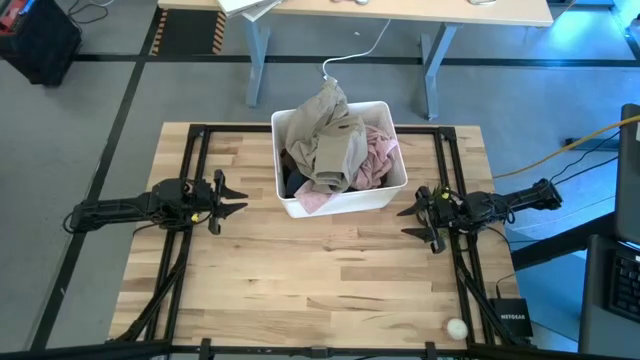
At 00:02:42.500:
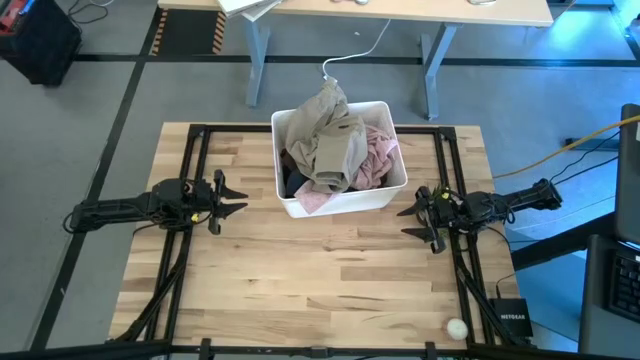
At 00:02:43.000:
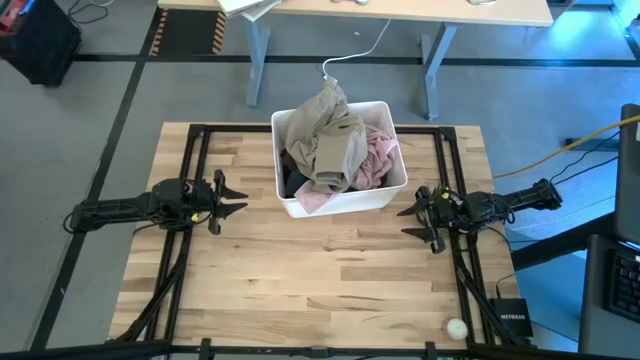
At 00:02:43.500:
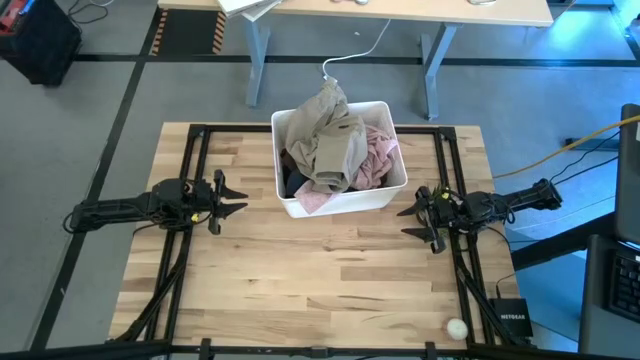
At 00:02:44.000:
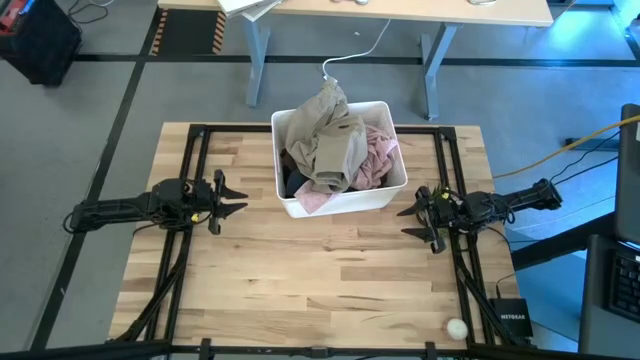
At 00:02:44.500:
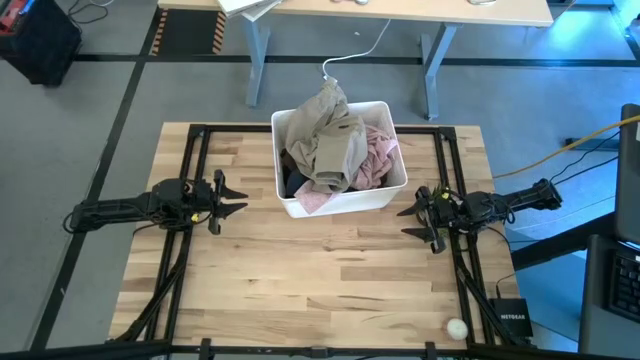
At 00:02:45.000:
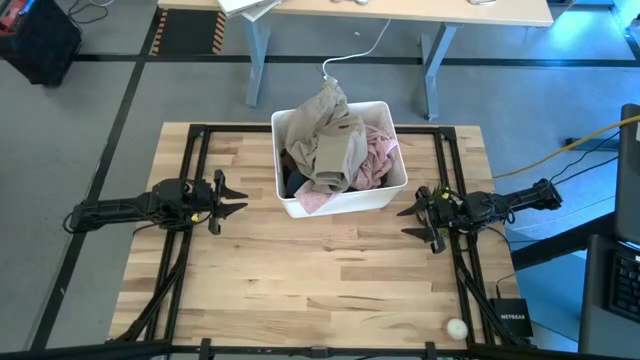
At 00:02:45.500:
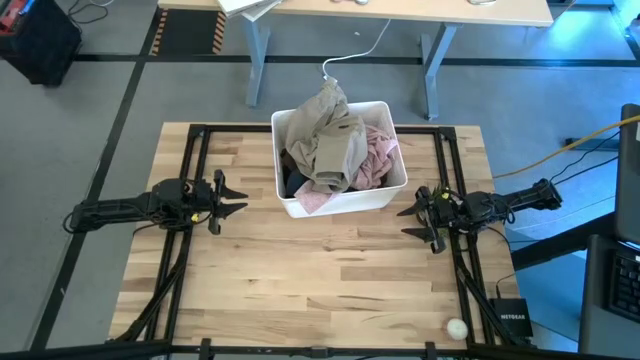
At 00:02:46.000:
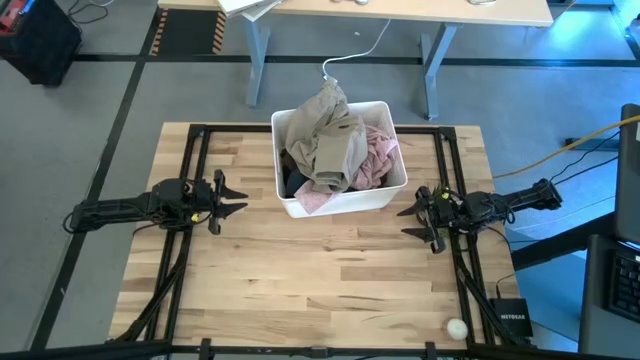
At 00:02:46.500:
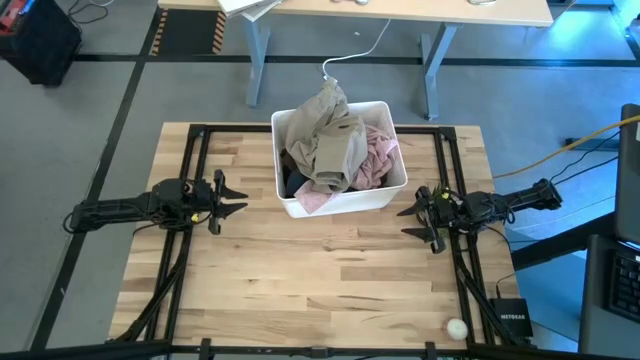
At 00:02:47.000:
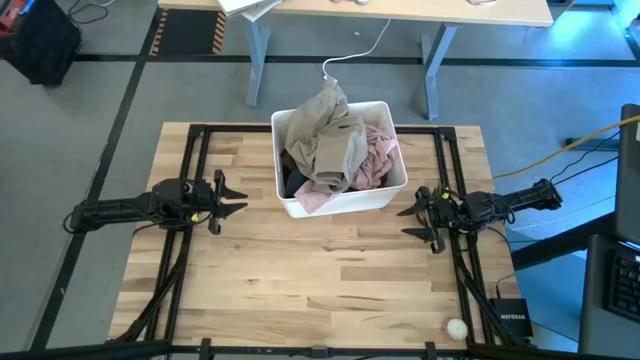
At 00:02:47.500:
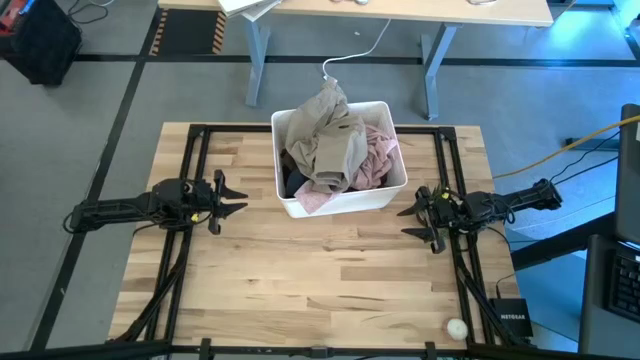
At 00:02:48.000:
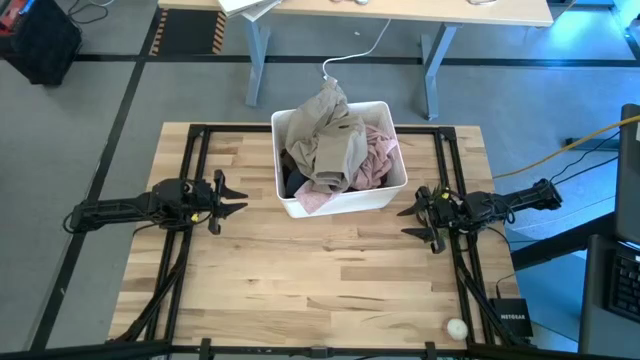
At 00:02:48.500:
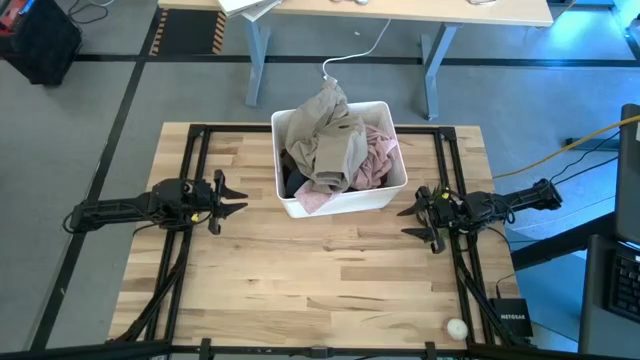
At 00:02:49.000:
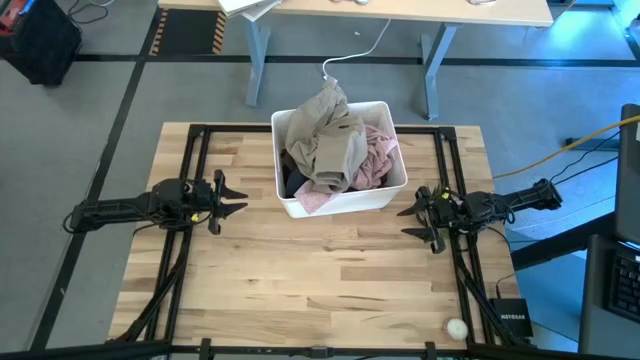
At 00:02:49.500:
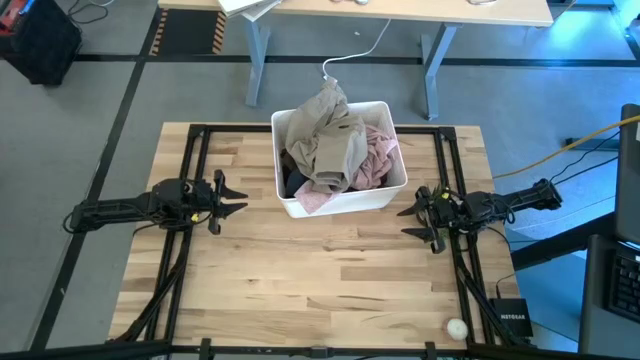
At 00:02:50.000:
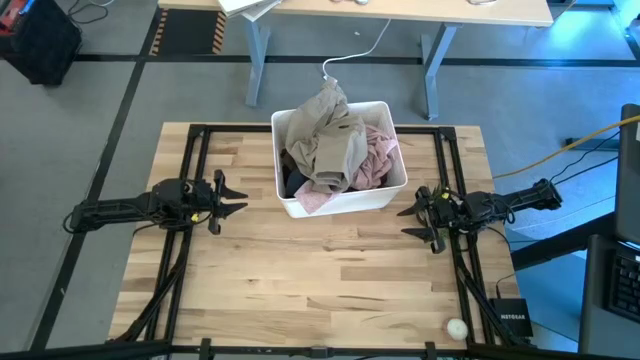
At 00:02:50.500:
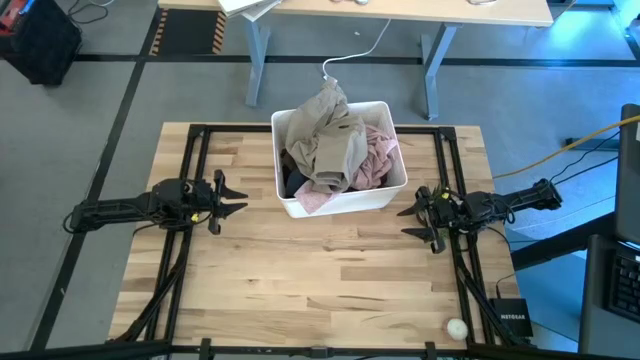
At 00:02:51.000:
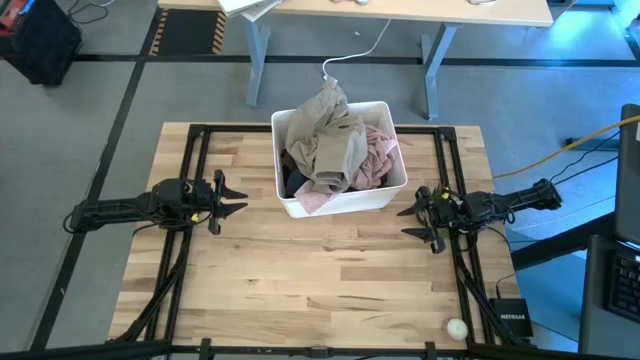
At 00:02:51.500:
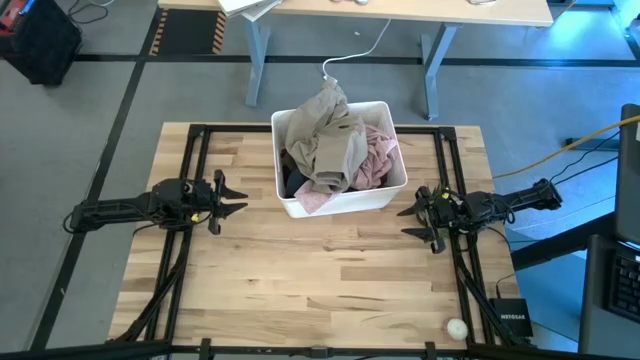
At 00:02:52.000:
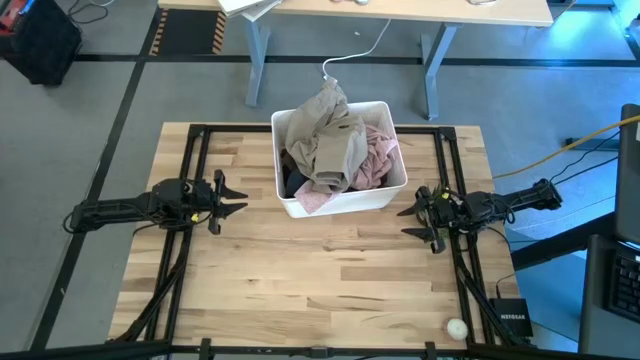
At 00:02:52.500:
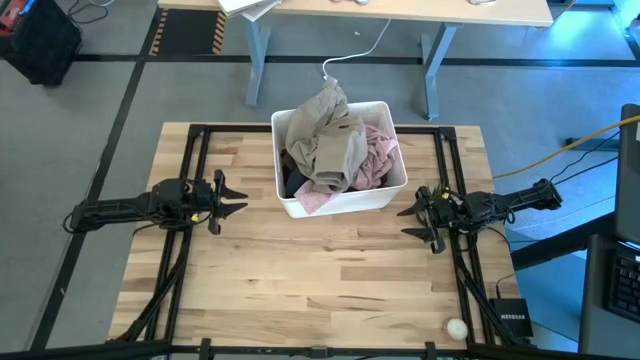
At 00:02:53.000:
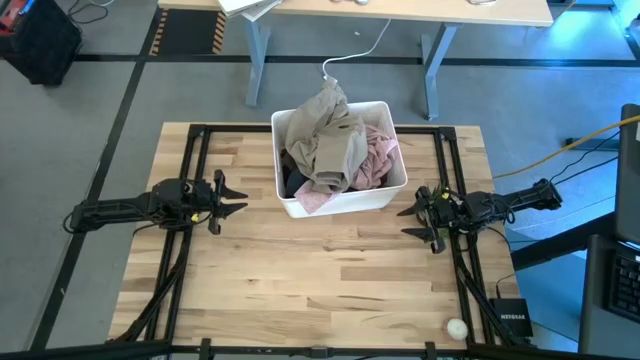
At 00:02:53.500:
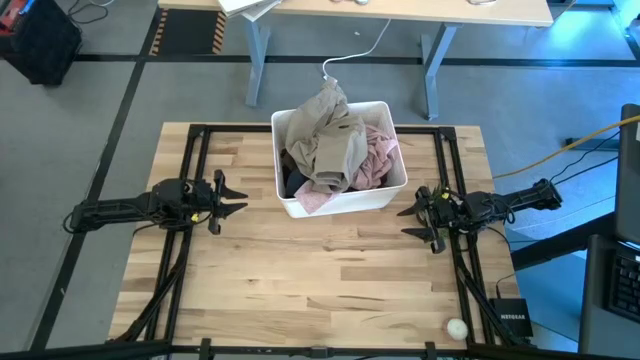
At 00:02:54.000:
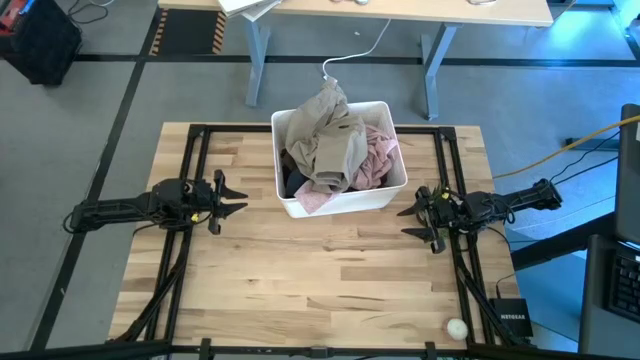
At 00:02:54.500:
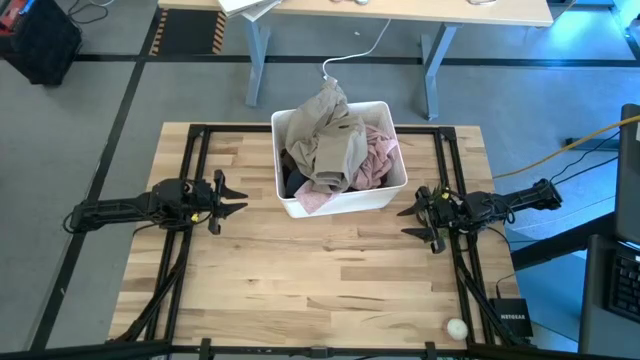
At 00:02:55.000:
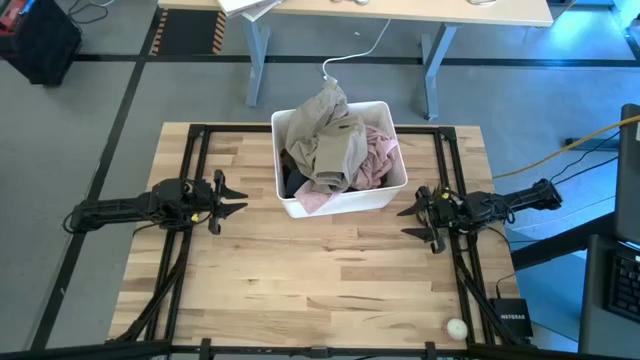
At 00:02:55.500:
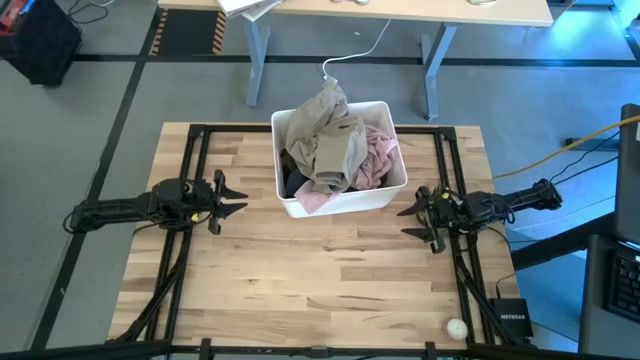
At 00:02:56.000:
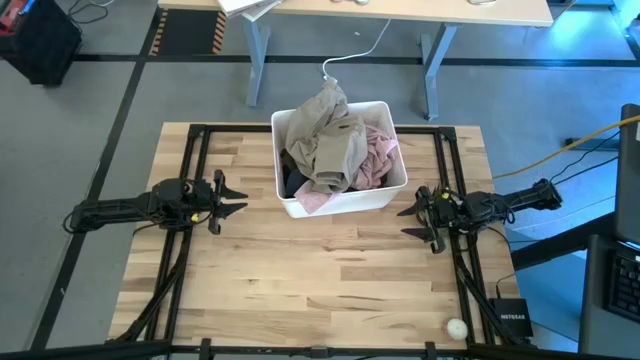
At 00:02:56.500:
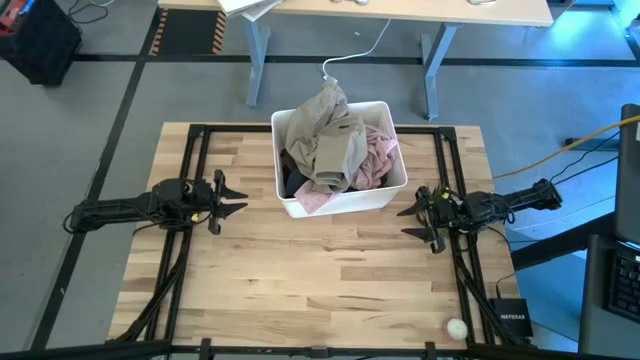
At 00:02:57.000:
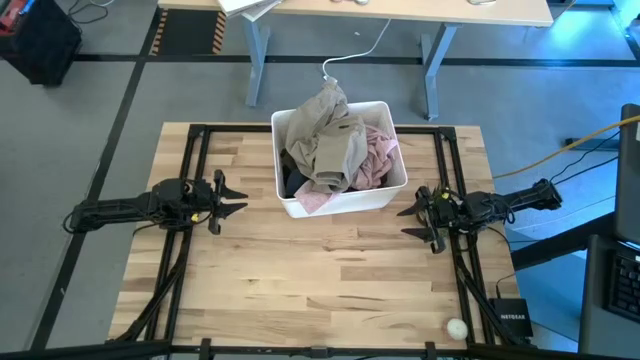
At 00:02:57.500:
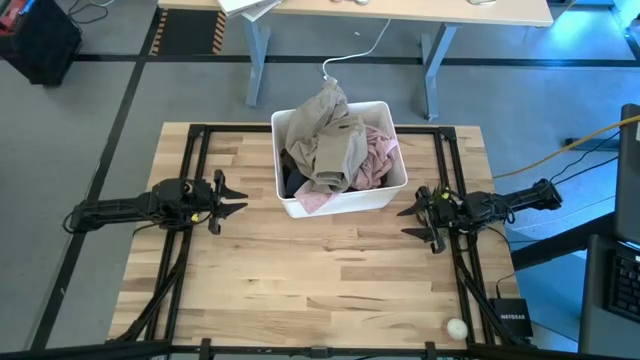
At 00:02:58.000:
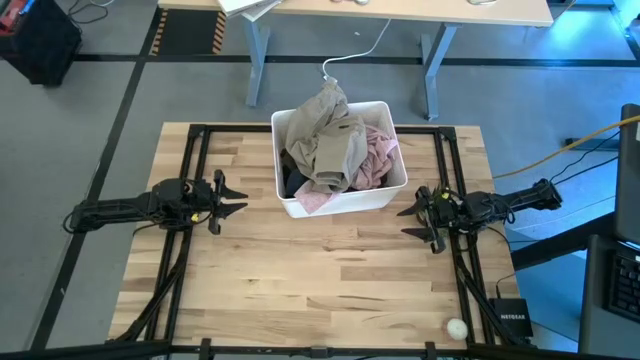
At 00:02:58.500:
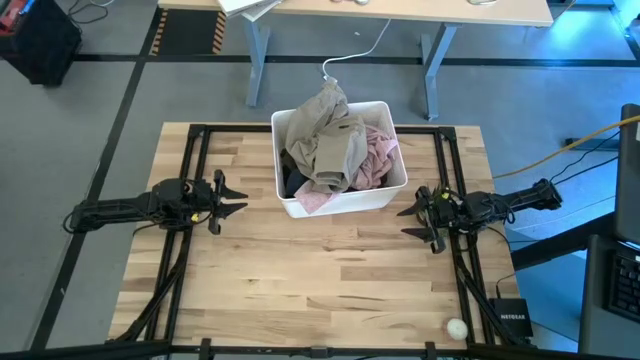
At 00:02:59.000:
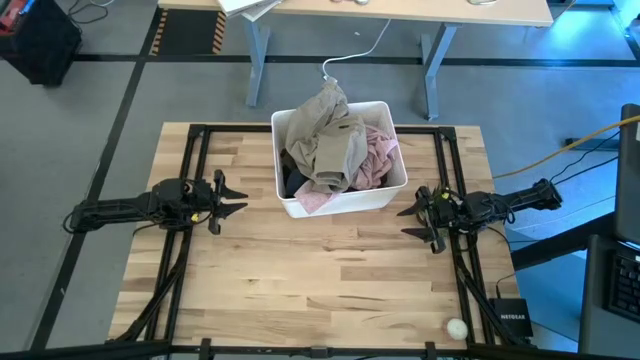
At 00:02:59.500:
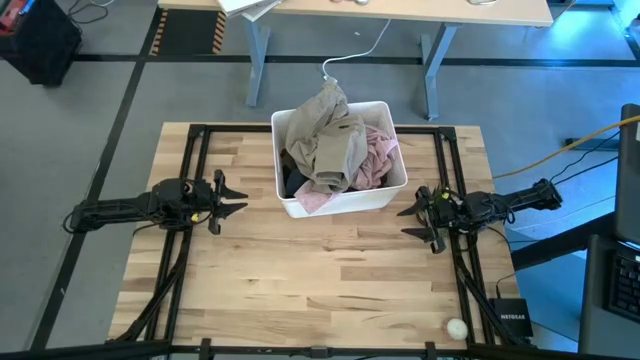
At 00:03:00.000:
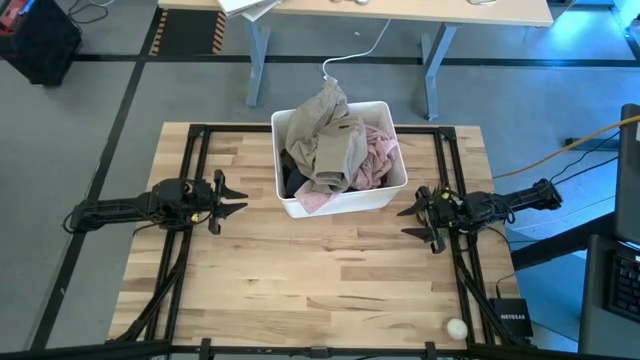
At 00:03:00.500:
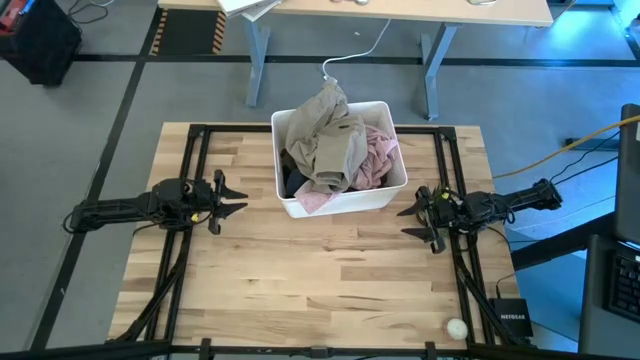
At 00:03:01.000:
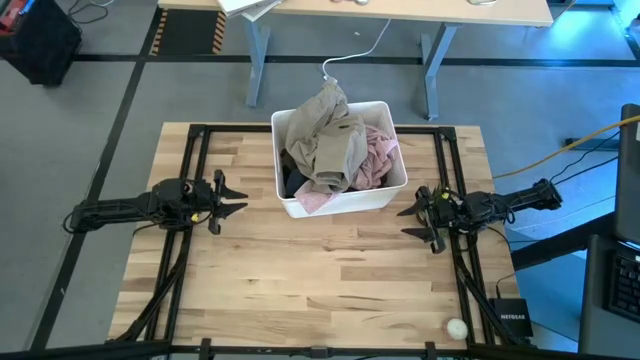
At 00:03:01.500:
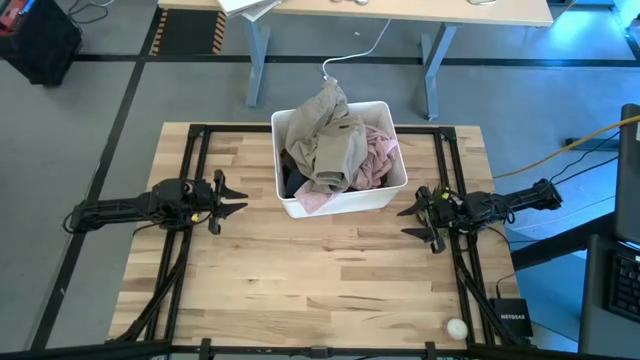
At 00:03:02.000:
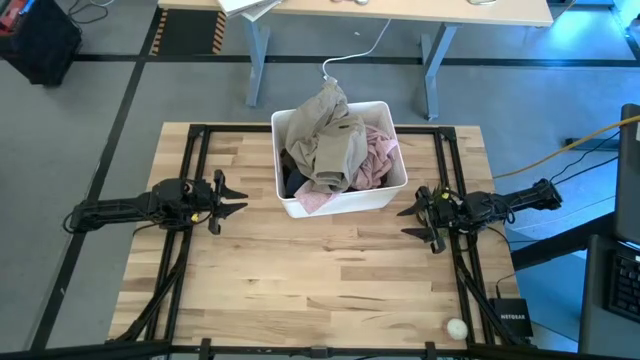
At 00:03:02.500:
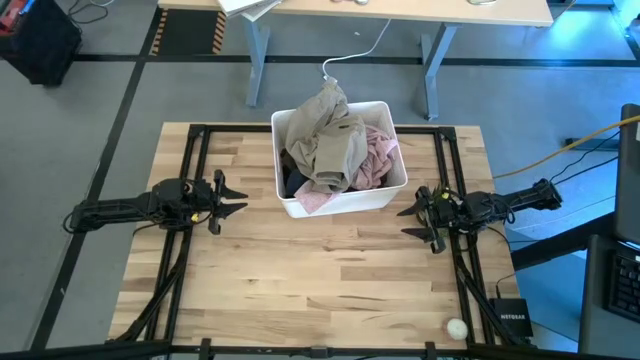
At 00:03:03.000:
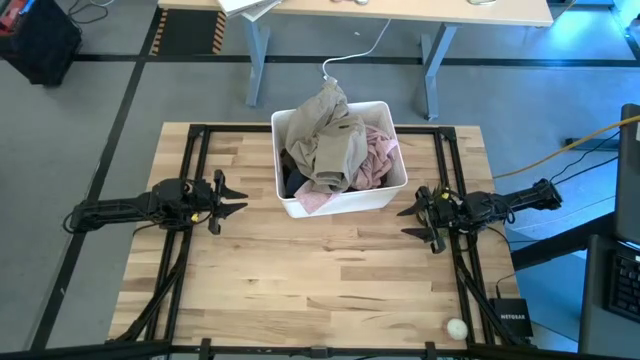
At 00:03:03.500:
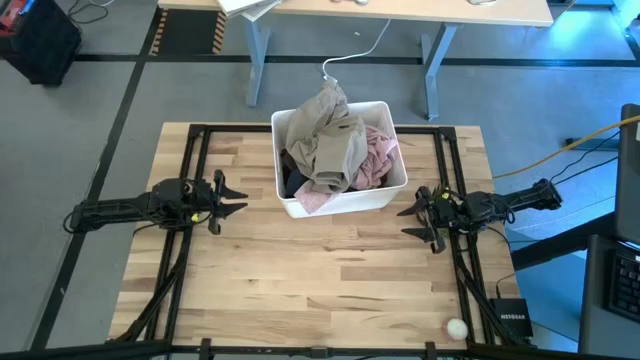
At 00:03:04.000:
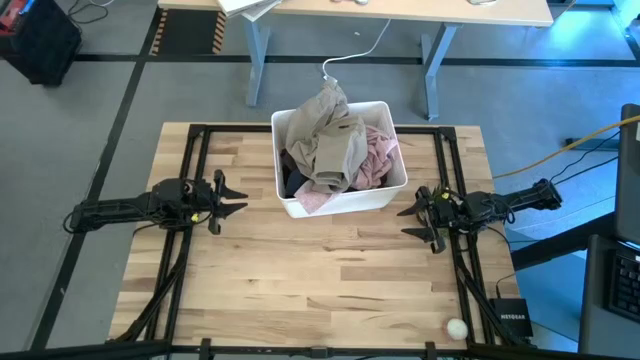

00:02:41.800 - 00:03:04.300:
Task: Sort clothes
Return to Home Position
